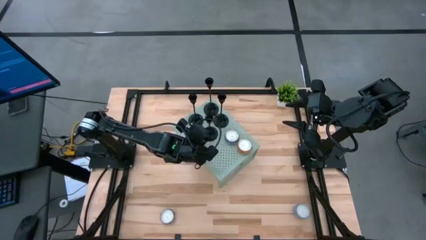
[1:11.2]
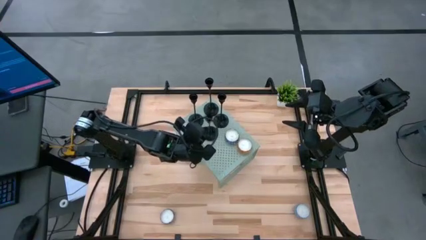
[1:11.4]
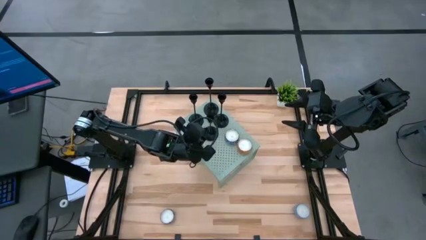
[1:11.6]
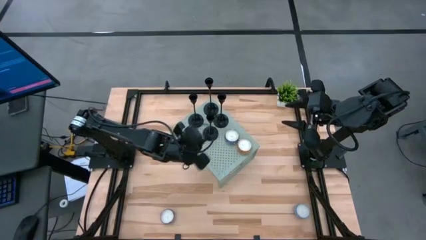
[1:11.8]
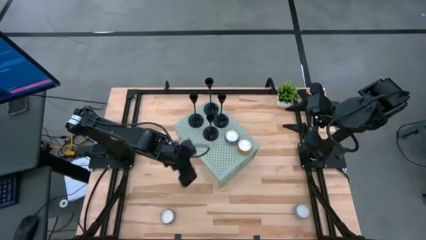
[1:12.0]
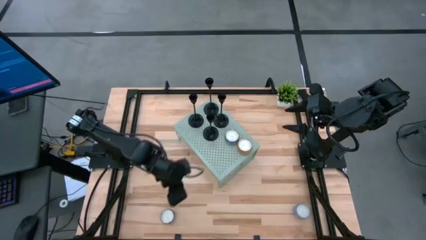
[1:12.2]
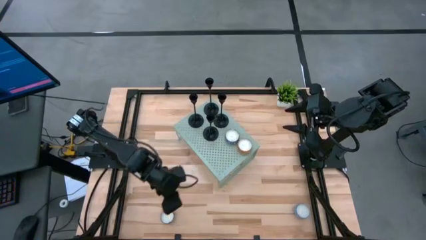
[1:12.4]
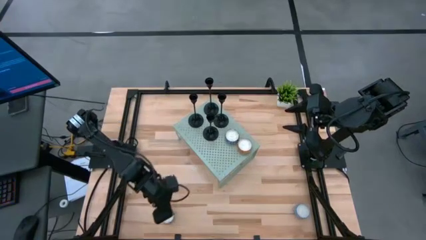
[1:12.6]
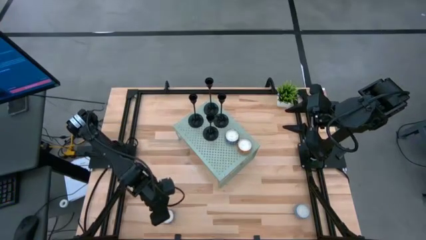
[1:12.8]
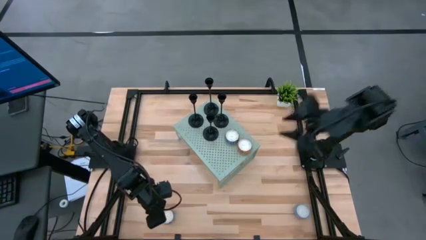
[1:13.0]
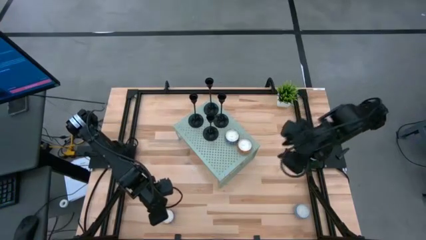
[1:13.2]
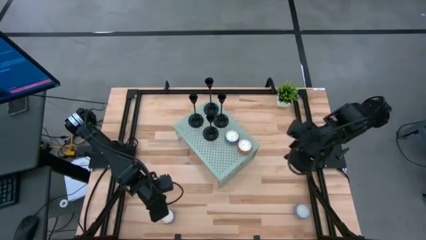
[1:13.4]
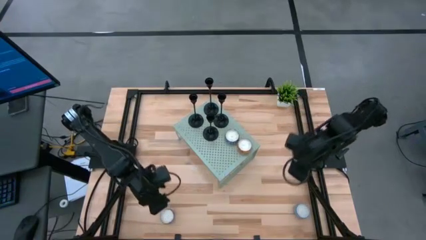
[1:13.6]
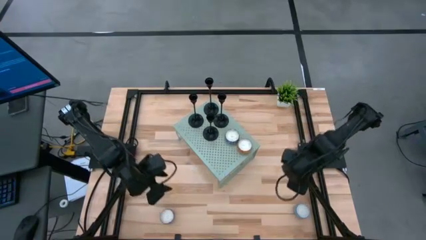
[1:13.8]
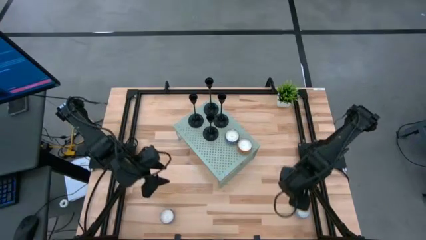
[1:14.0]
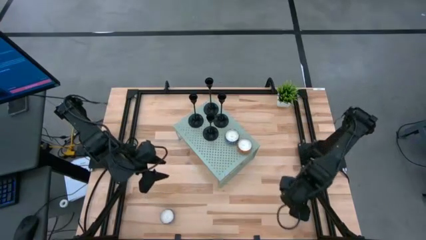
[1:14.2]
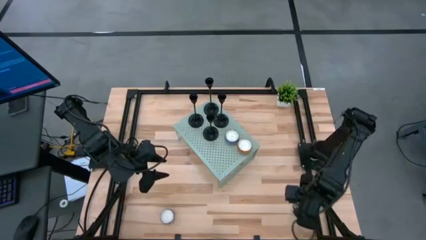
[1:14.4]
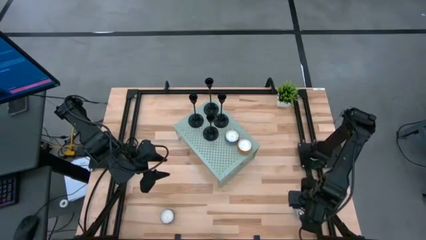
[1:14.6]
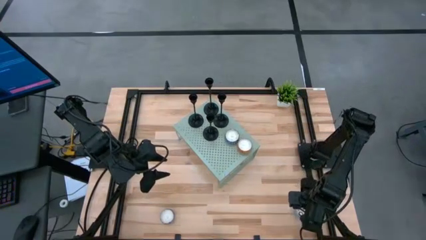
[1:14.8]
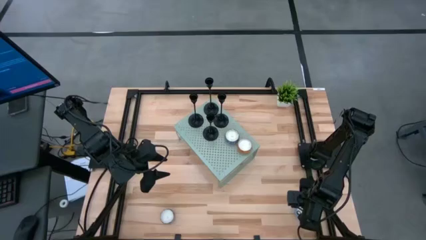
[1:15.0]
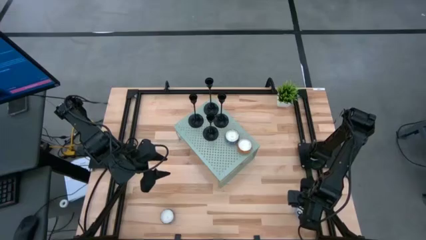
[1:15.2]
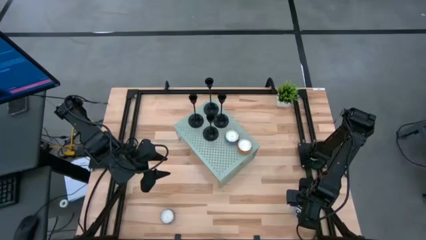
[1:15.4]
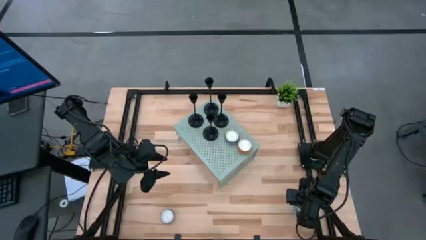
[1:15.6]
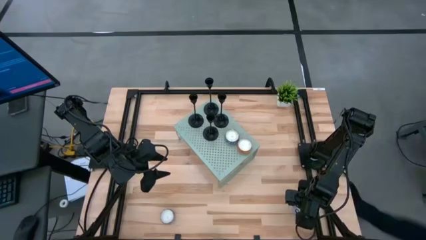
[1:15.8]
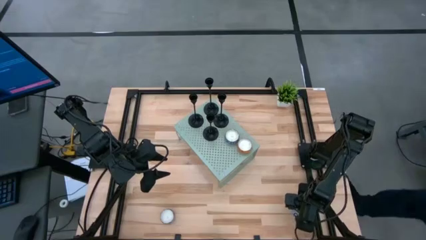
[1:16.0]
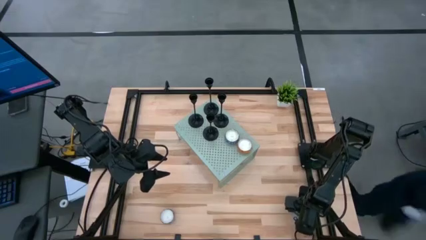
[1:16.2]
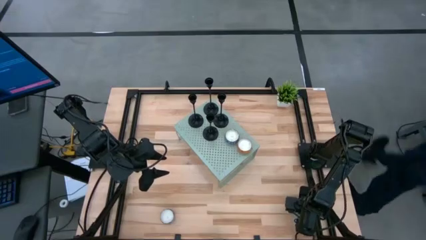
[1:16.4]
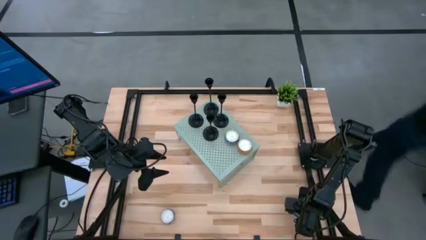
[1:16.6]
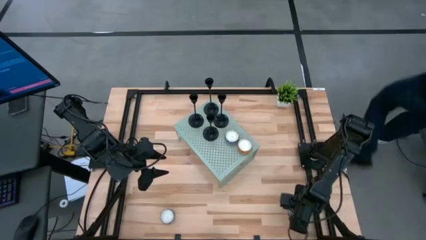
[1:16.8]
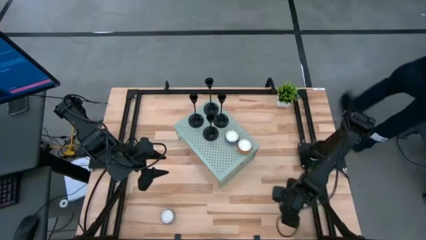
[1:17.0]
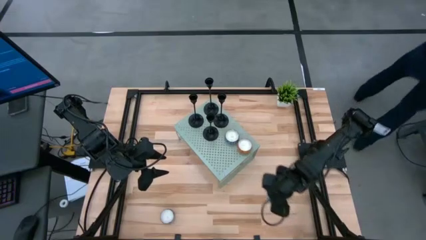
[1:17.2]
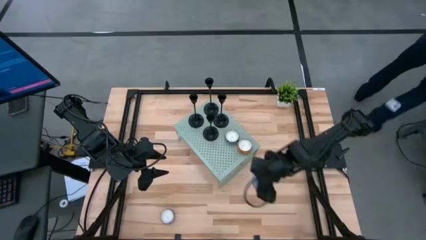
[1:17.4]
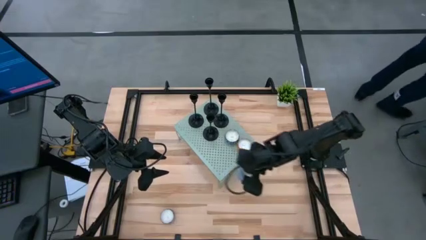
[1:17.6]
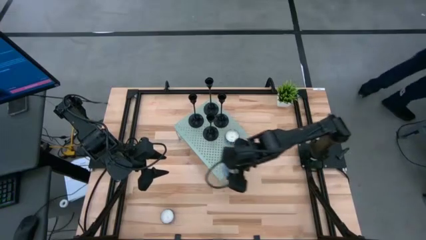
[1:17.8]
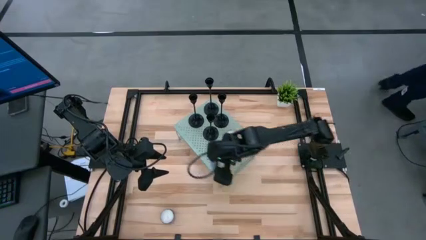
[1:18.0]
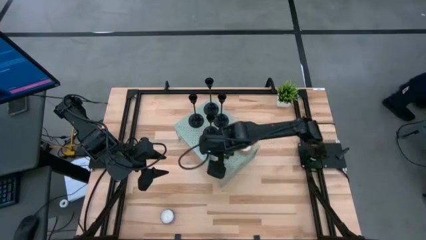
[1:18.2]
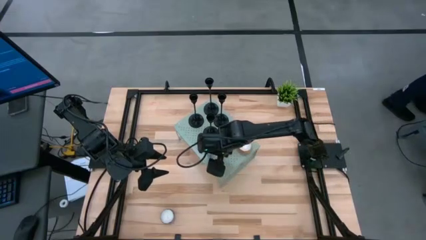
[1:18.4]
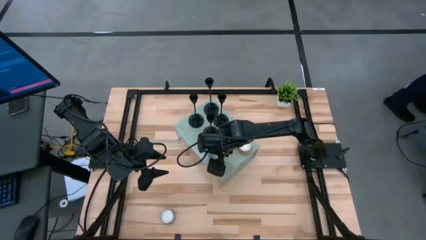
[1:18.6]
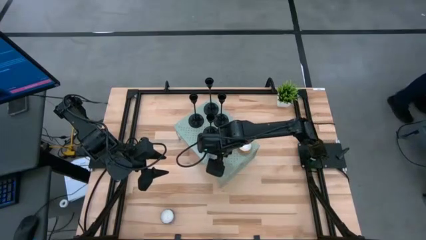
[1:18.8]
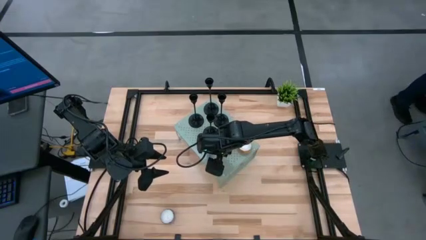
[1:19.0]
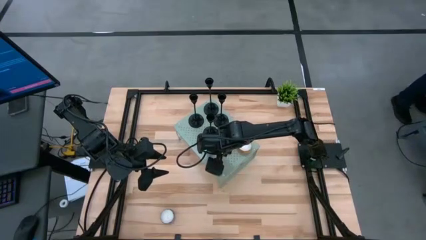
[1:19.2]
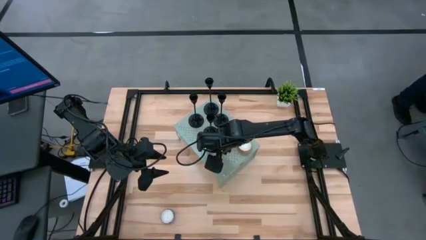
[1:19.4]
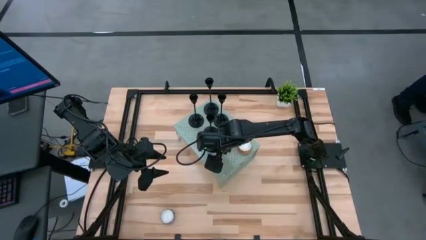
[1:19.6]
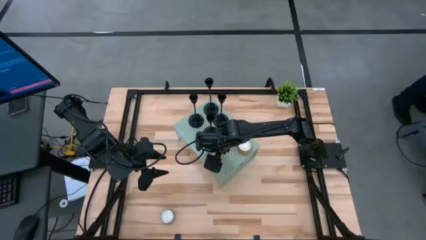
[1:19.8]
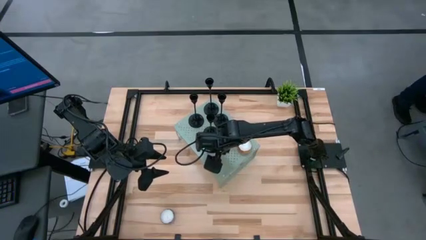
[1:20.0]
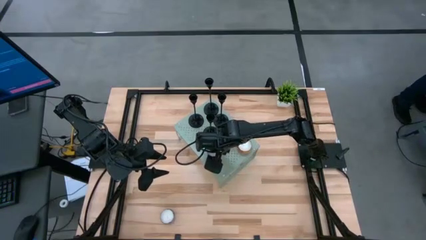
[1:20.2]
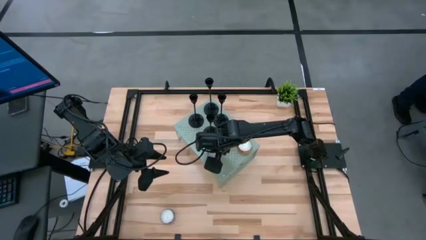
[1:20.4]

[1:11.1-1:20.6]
Task: Pick & Place candle stick holders
Put the blue scented candle on the shelf

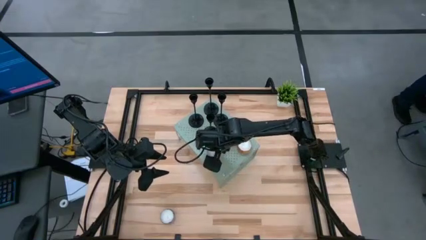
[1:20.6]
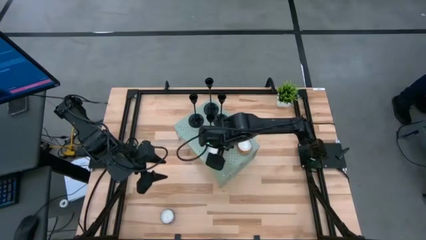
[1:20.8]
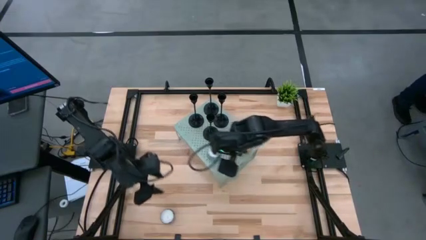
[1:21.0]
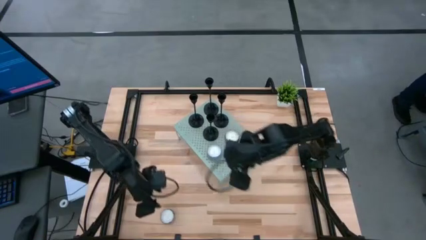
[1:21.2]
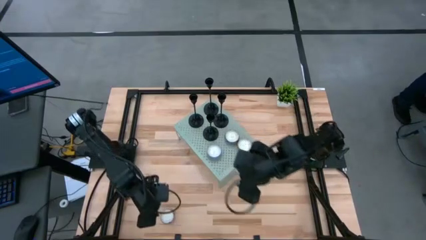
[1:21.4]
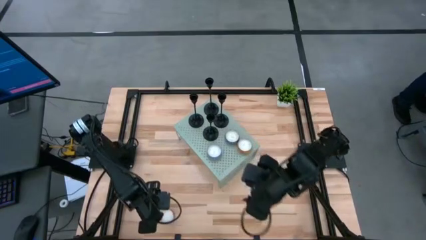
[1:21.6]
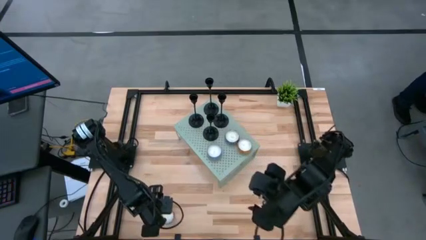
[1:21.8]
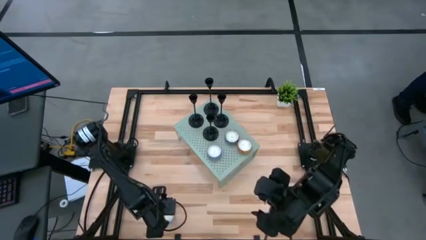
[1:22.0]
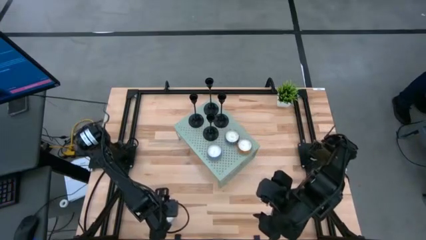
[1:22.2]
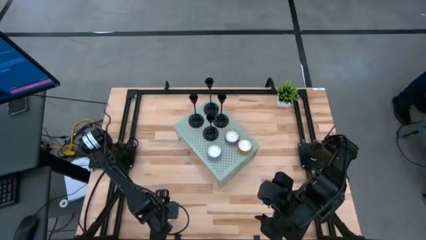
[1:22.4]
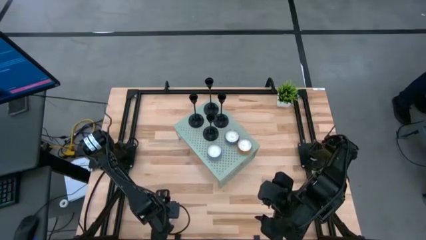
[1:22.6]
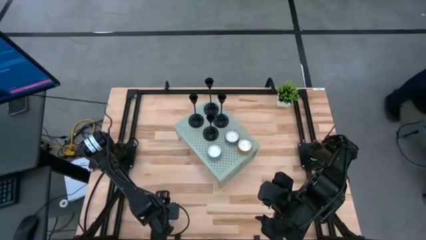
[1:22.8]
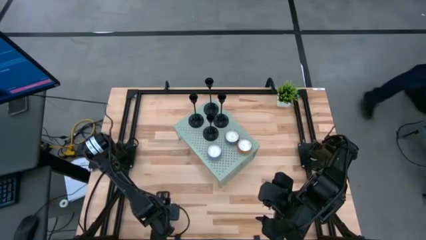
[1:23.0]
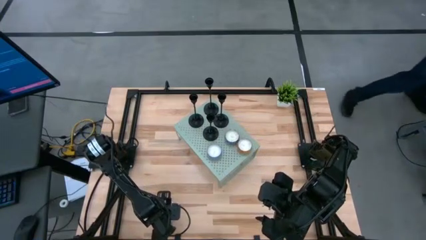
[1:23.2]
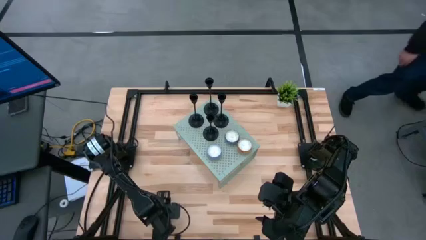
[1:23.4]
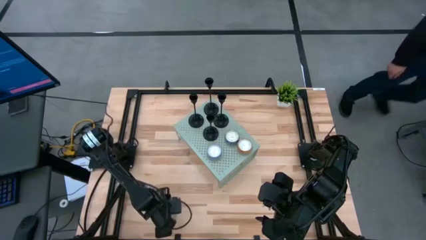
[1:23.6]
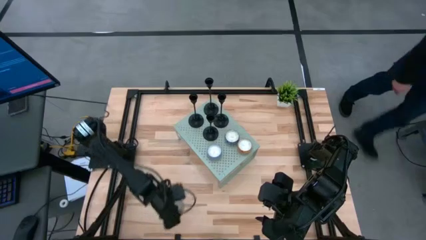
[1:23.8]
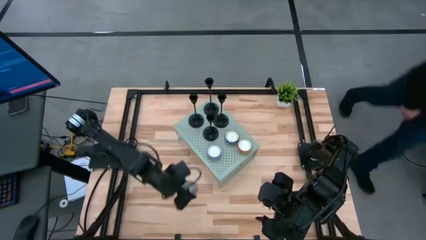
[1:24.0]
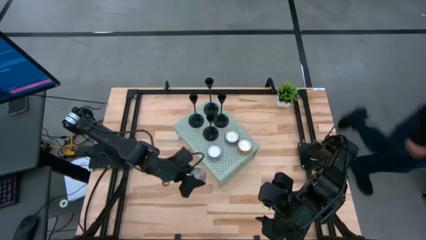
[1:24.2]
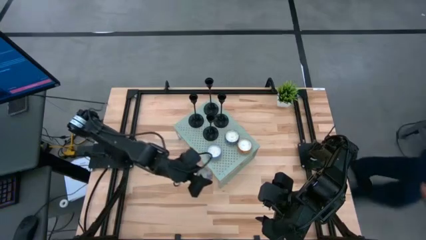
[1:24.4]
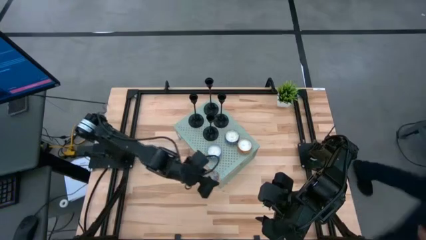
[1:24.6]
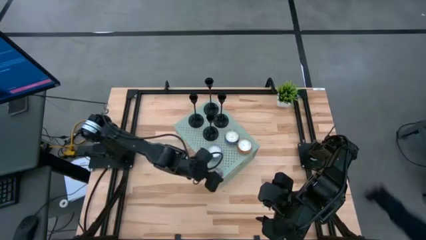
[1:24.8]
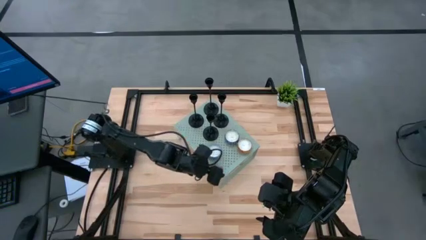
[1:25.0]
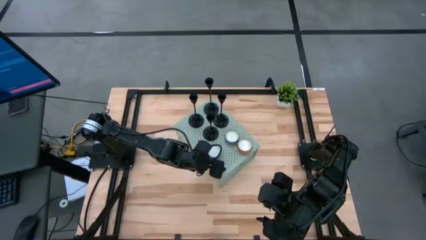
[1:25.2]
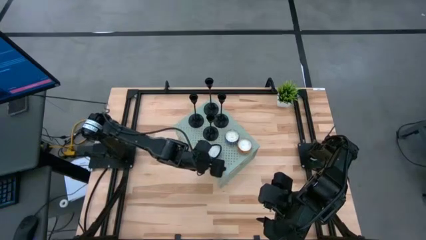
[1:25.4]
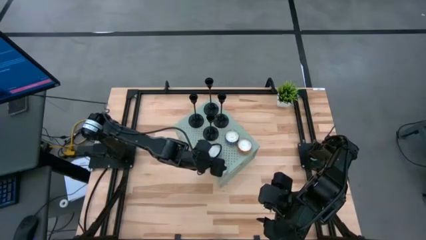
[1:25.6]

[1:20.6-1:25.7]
Put the red scented candle on the shelf

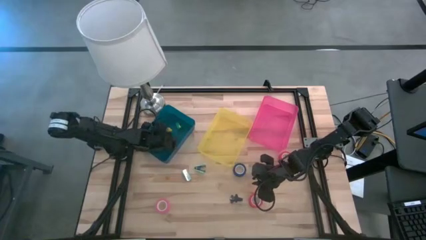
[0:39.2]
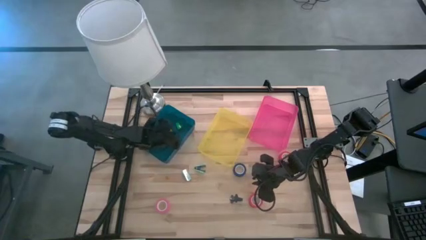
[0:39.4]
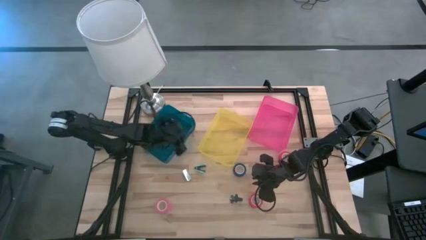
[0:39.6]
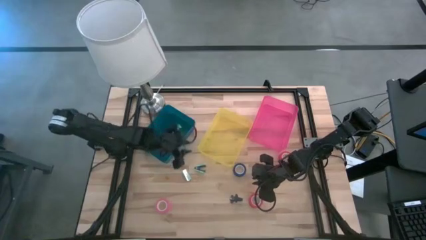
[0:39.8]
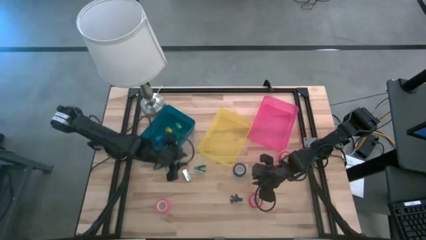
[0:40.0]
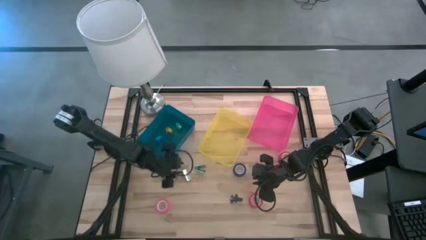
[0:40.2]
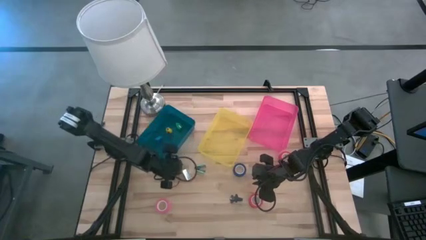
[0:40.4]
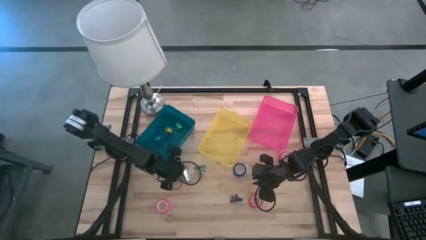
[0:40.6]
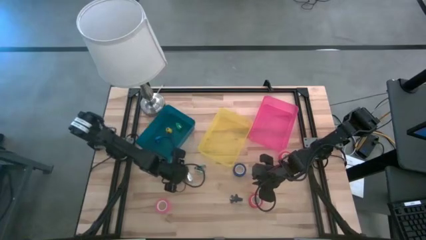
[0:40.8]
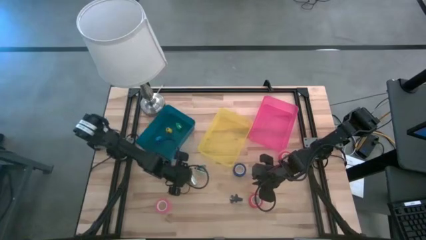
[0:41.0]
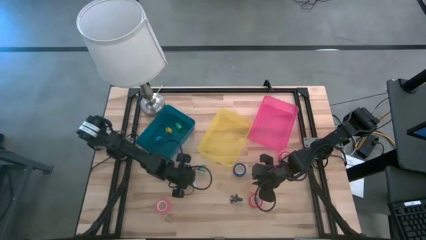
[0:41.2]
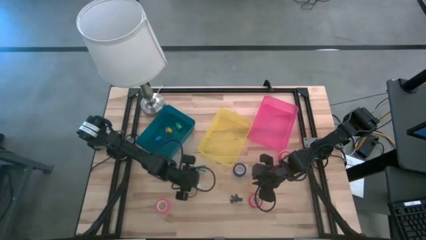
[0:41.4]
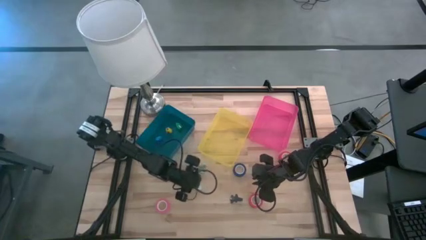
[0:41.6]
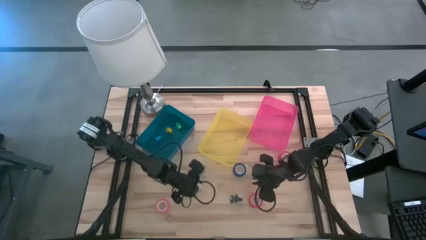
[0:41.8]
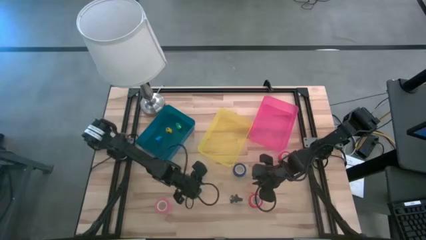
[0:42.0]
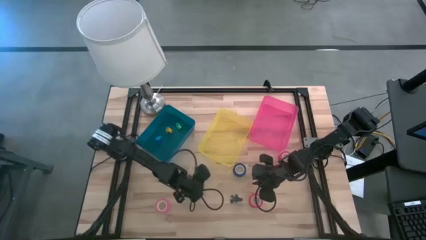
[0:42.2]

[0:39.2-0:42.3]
Task: Pick and place Stapler, Stapler remover, tape
Put the left light blue staple remover into the yellow bin
